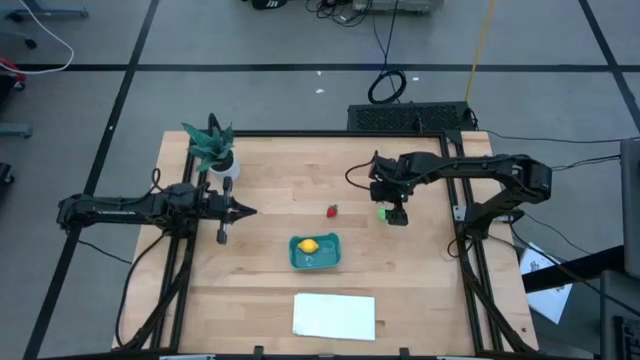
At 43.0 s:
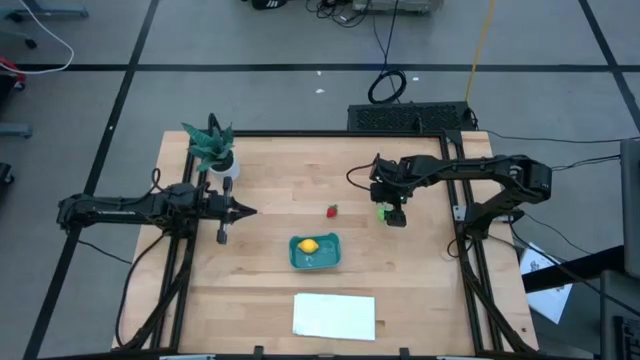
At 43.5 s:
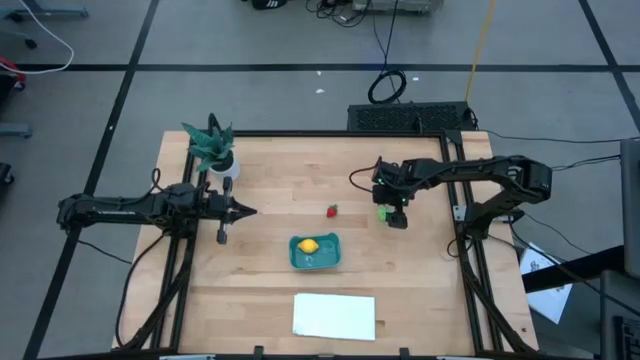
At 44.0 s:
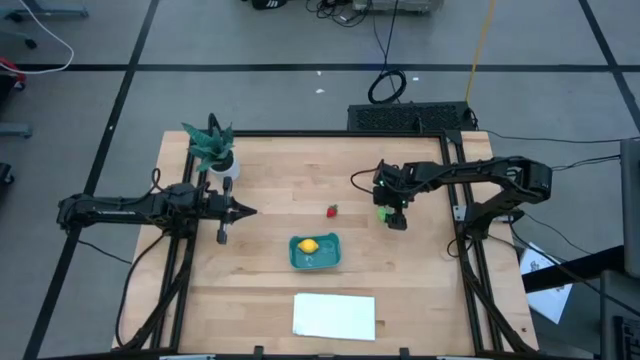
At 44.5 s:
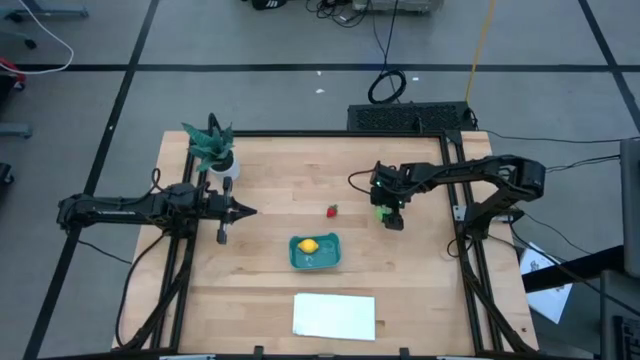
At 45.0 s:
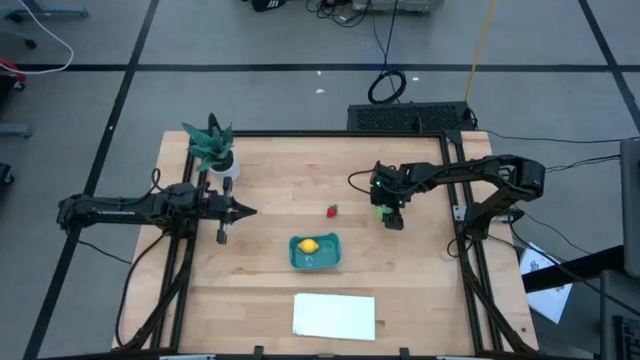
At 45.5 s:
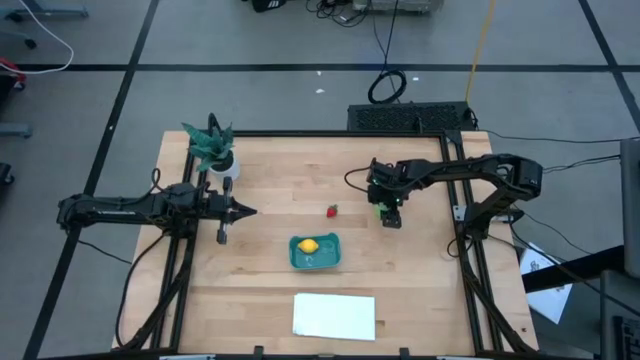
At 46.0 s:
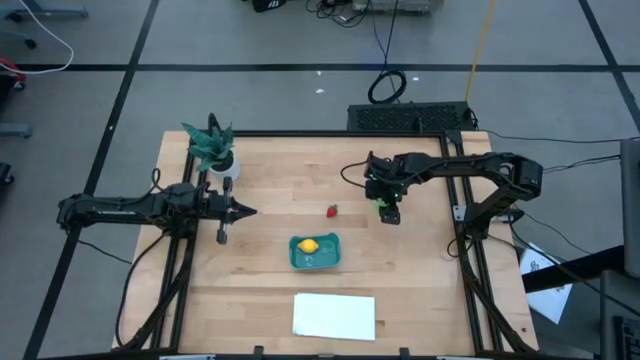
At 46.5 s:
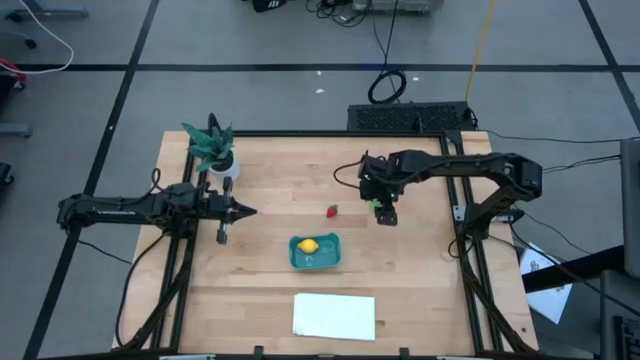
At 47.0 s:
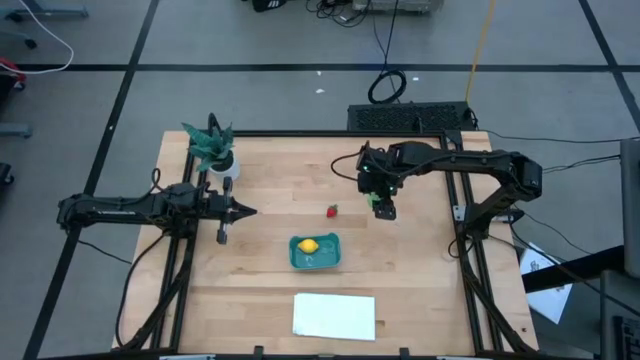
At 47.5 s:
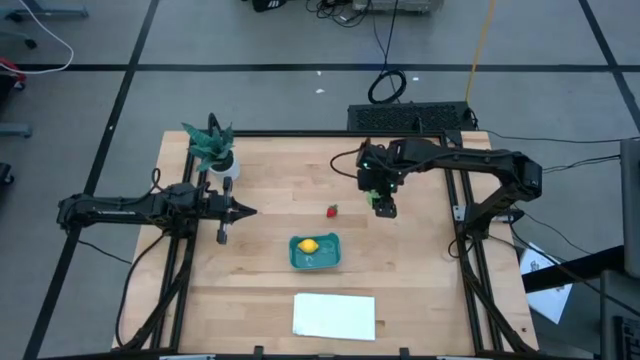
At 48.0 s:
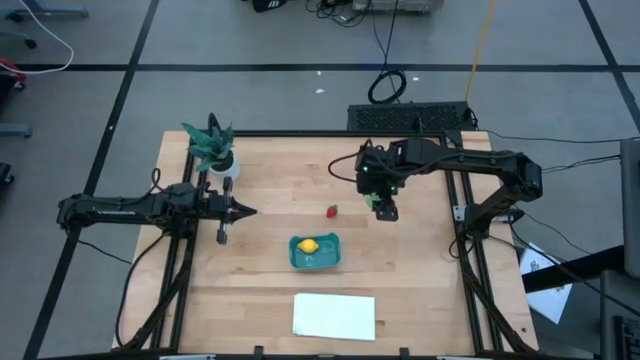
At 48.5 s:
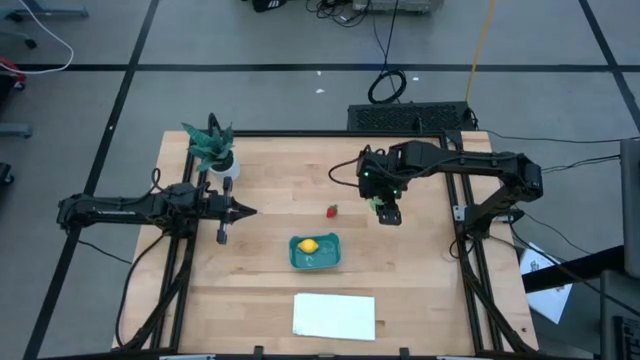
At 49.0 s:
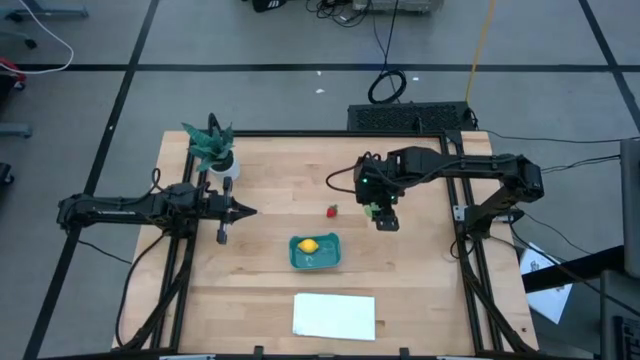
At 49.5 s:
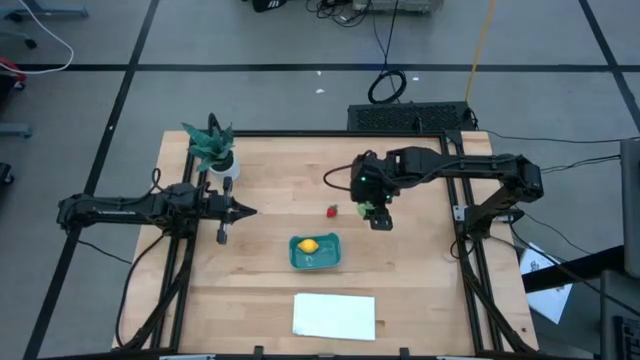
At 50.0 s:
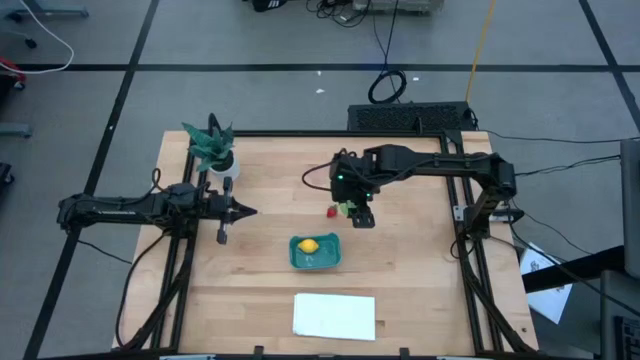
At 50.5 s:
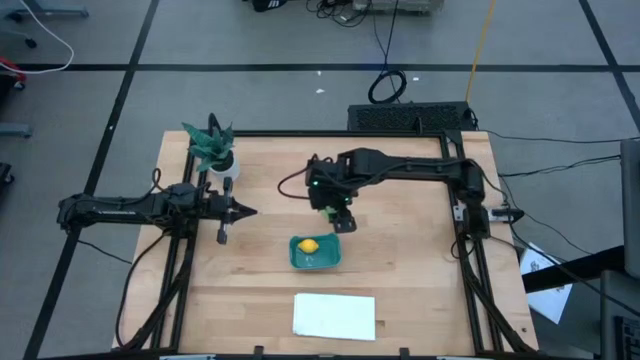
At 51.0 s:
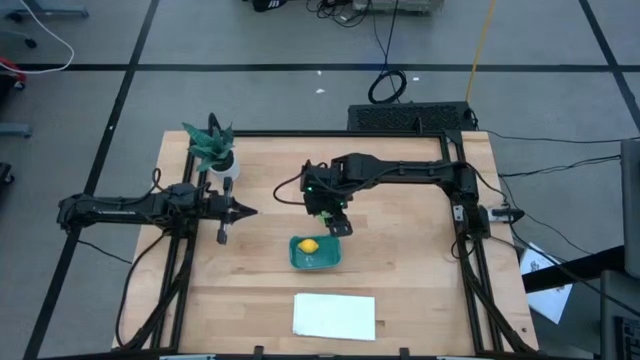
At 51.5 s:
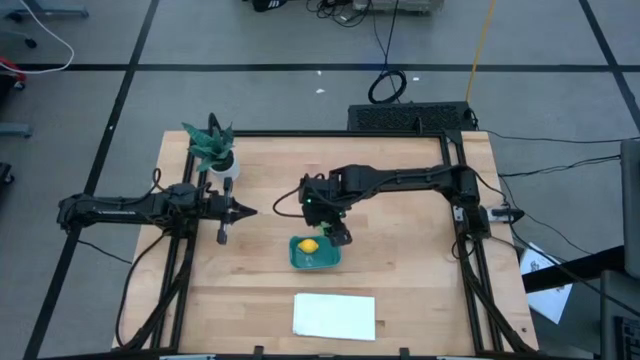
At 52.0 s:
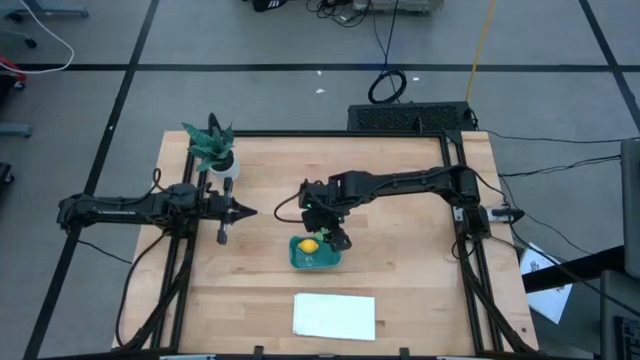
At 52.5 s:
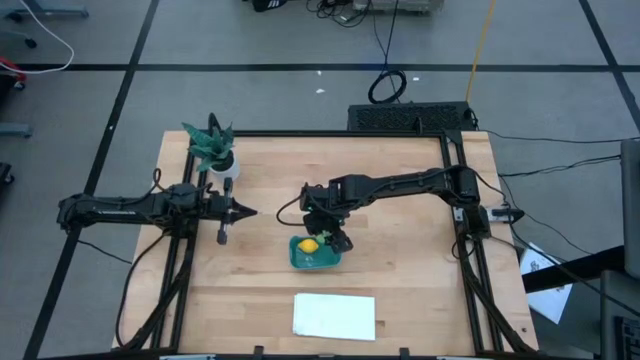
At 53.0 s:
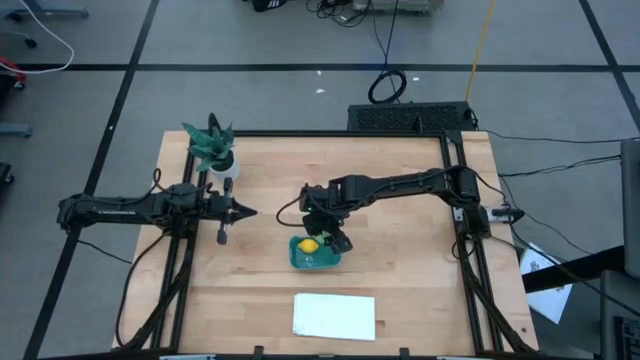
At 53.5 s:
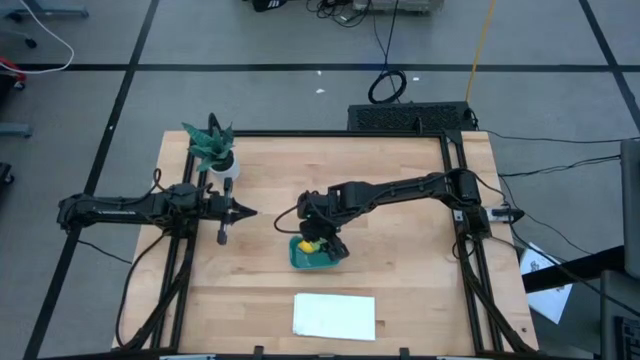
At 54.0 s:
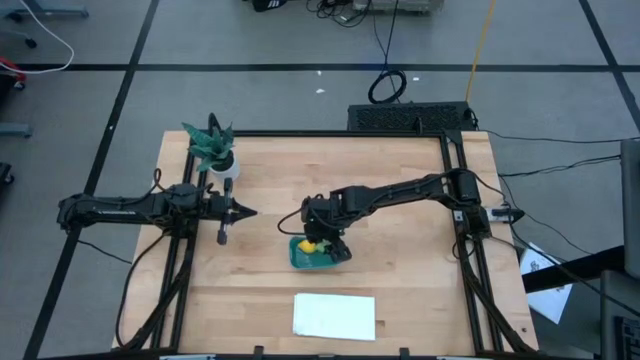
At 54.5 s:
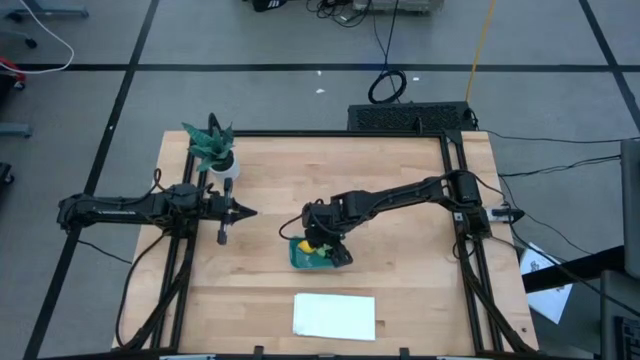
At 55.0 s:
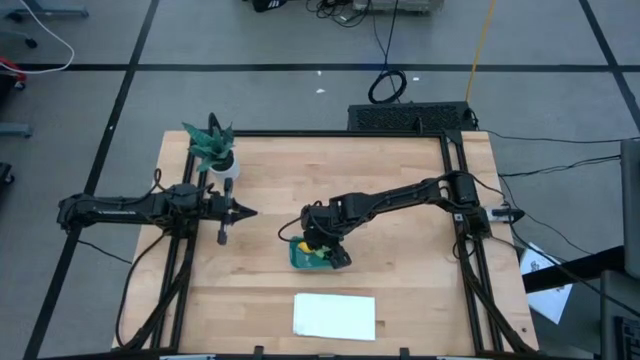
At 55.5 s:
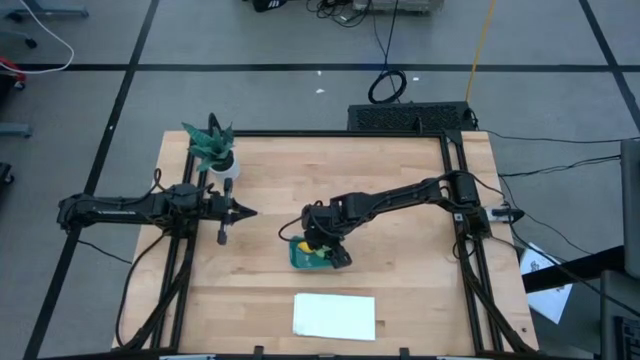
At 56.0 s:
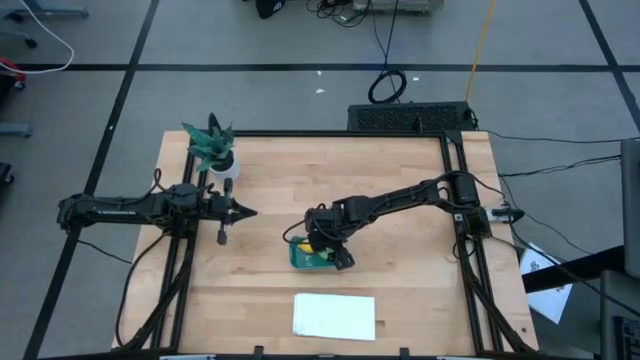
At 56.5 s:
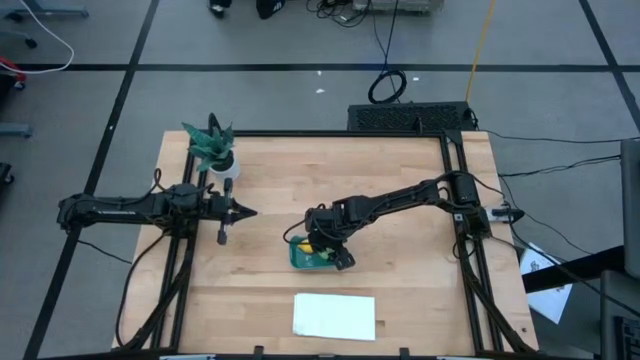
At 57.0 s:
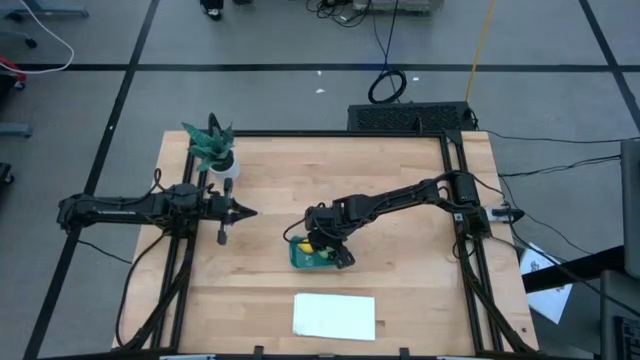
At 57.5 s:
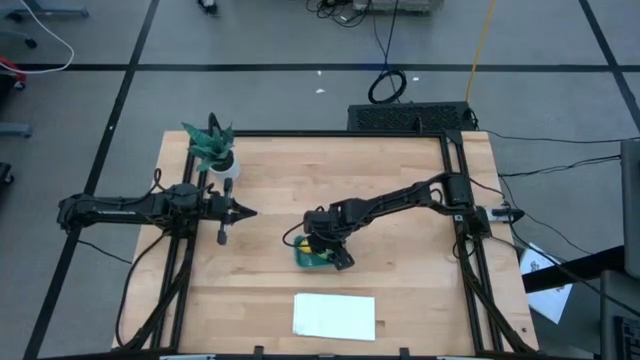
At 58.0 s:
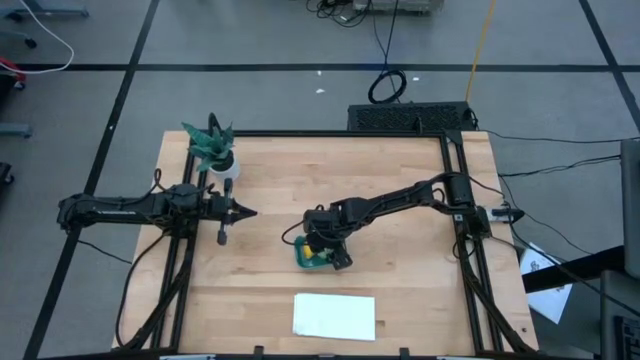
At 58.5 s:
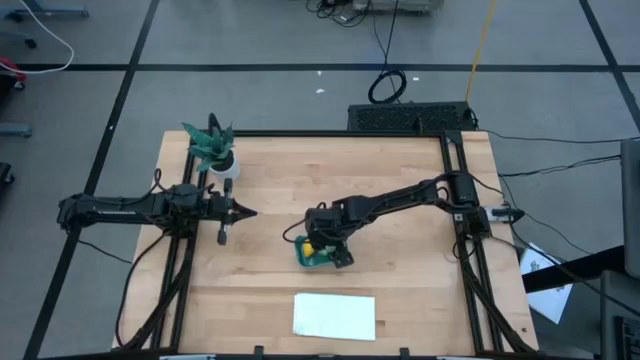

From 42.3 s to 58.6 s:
Task: Pick and placing Produce into tupperware
Put the green cabbage into the blue bin

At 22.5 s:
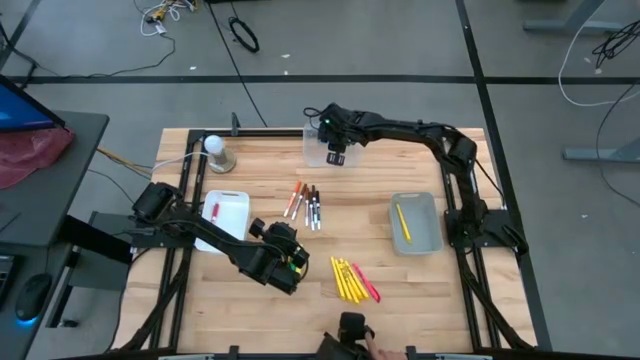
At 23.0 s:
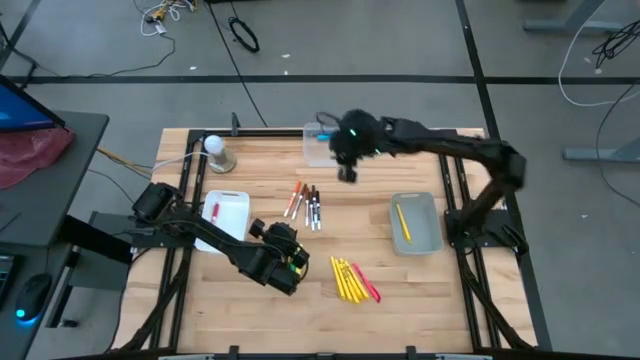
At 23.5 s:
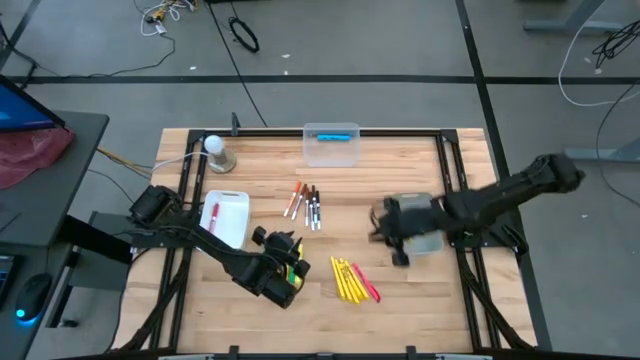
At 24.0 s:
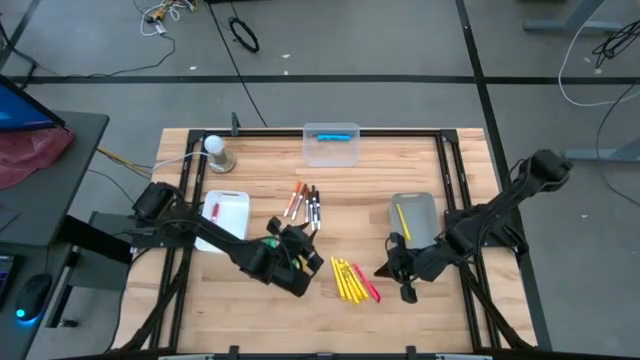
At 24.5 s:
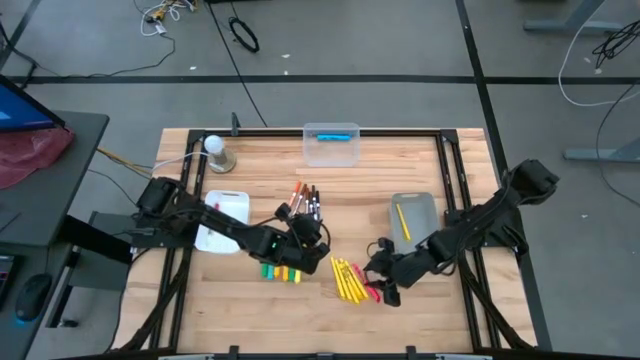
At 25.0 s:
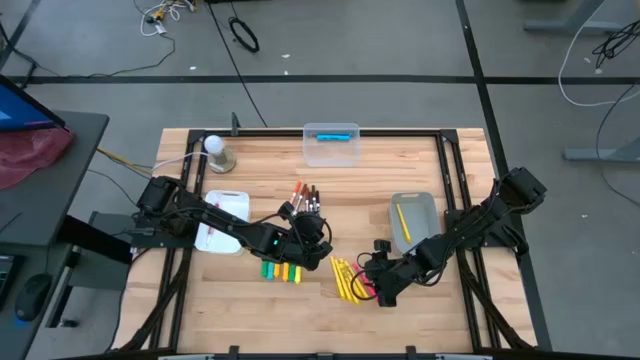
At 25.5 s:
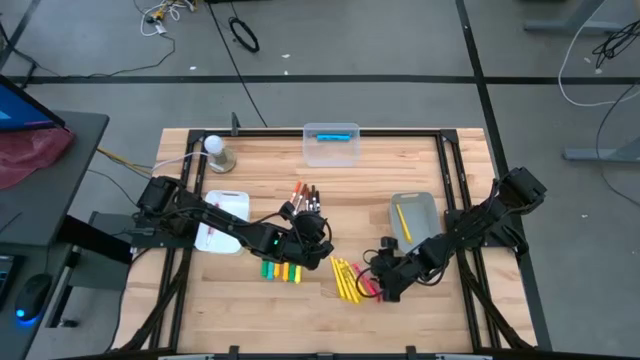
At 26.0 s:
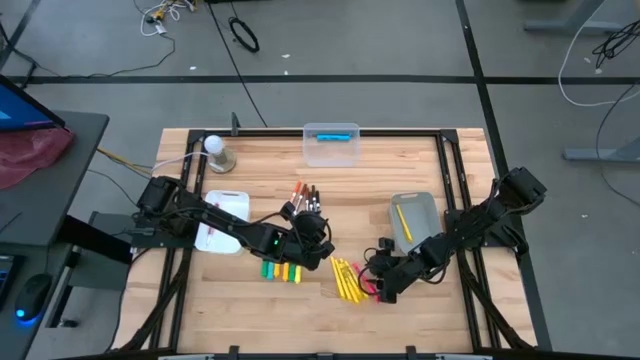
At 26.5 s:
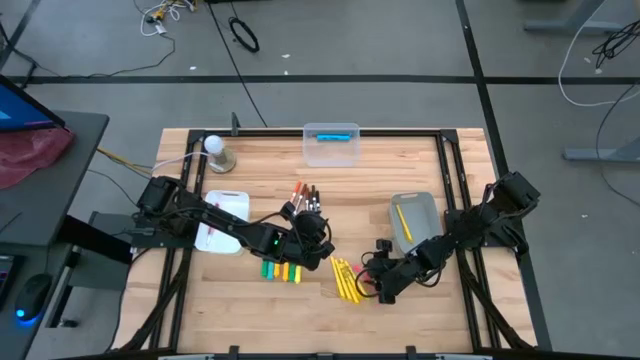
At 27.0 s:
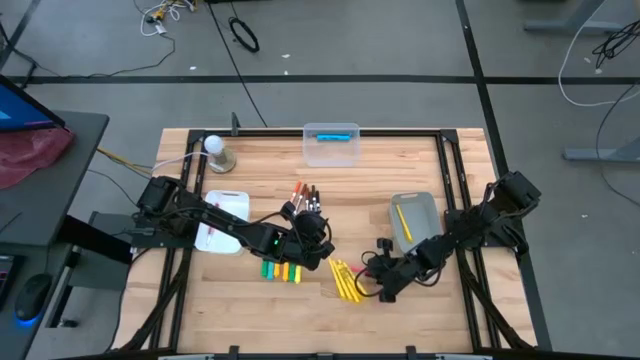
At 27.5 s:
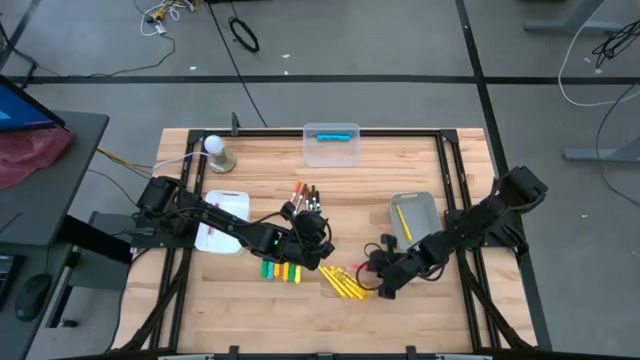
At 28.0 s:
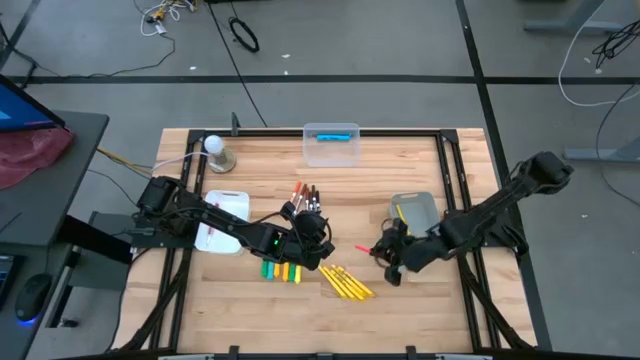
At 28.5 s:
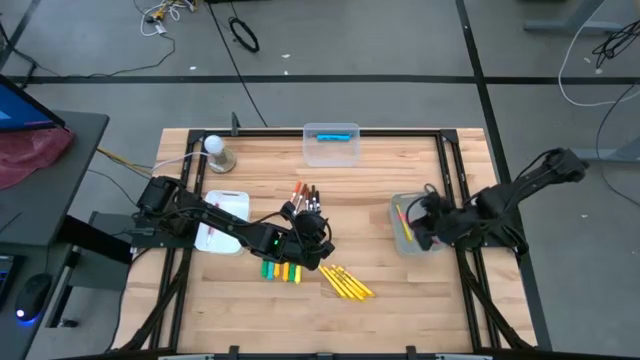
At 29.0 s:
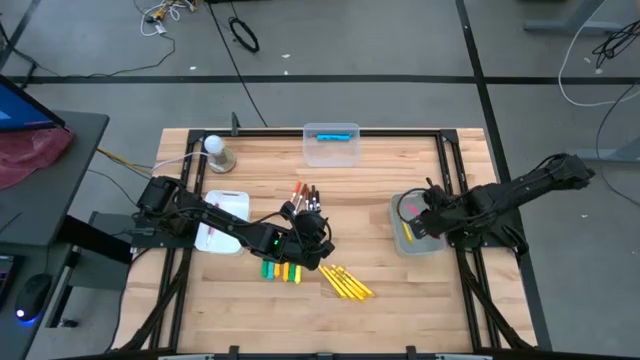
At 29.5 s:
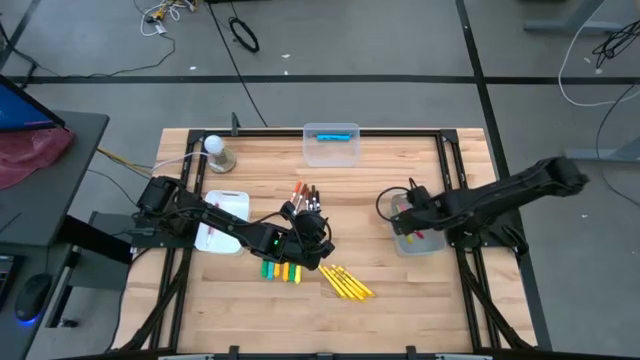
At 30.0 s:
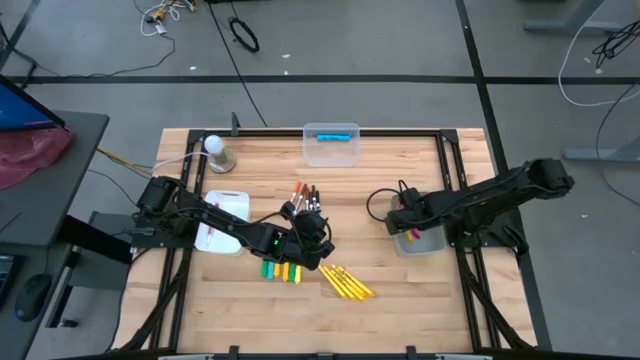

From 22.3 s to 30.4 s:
Task: Pick & Place Markers
Put the pink pen into the gray bin
